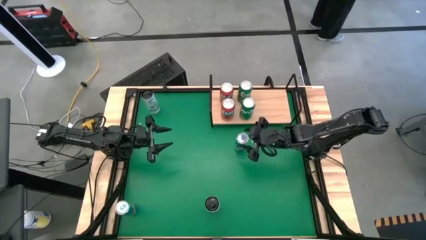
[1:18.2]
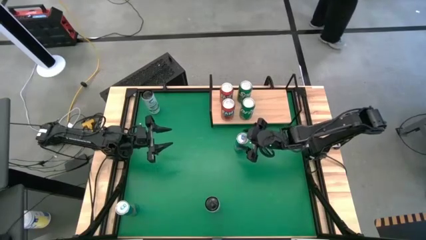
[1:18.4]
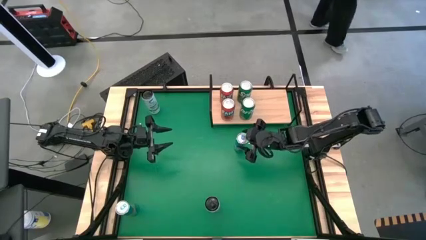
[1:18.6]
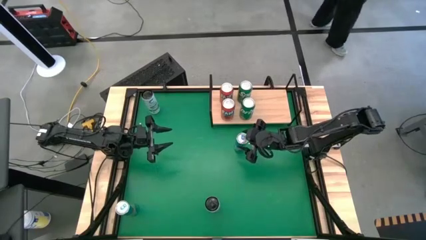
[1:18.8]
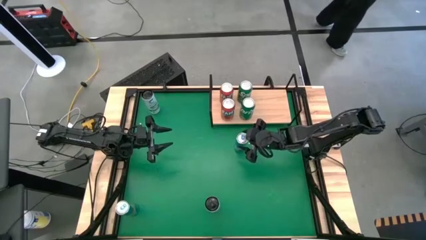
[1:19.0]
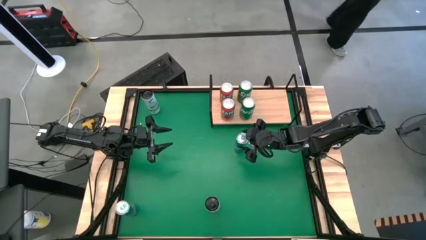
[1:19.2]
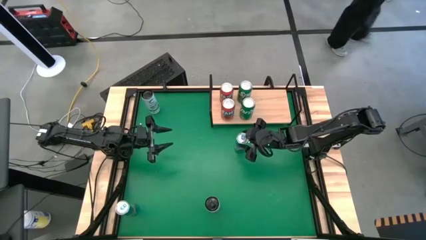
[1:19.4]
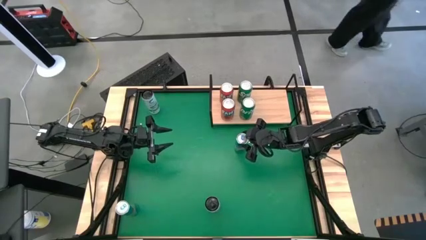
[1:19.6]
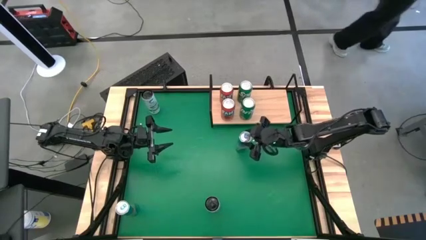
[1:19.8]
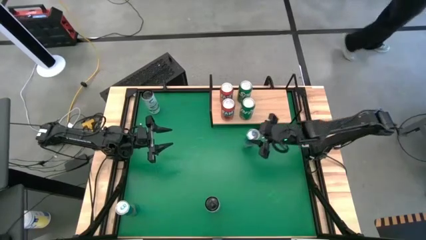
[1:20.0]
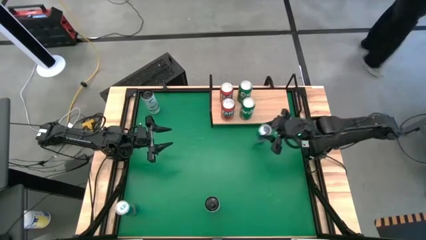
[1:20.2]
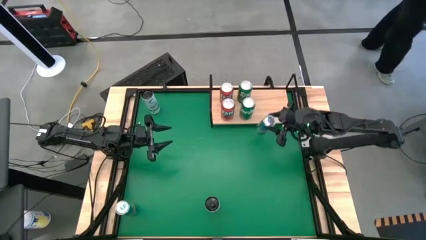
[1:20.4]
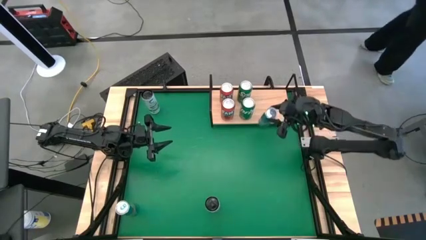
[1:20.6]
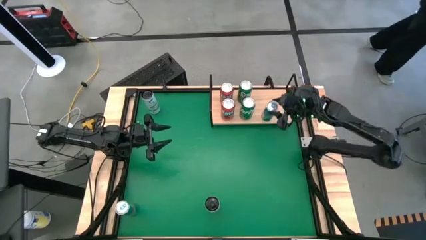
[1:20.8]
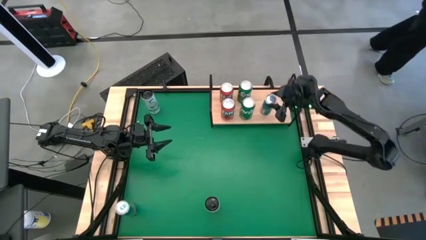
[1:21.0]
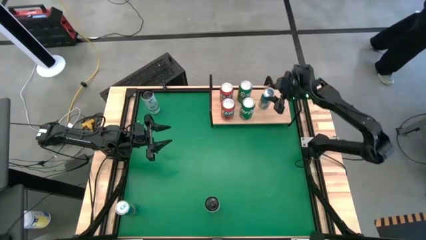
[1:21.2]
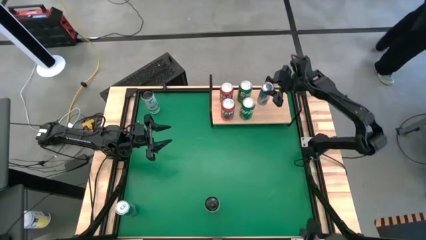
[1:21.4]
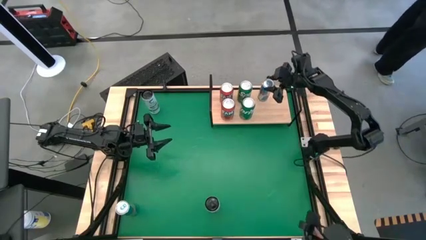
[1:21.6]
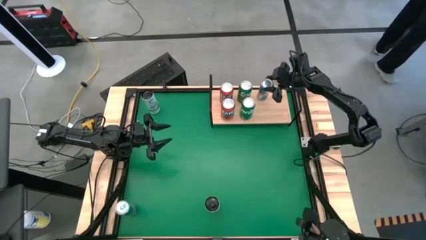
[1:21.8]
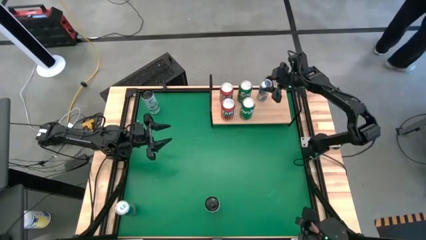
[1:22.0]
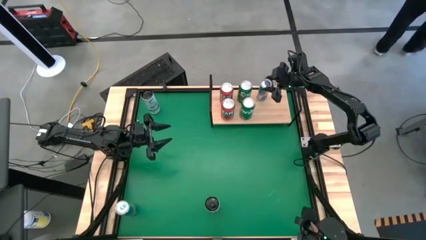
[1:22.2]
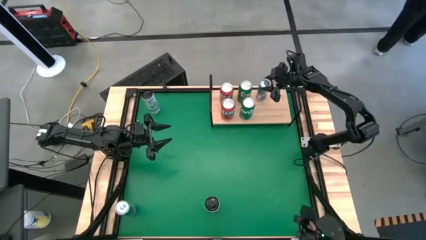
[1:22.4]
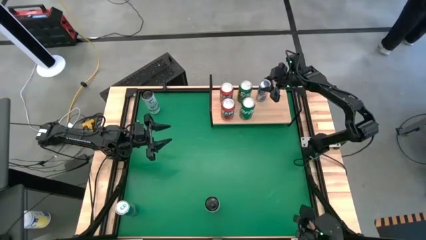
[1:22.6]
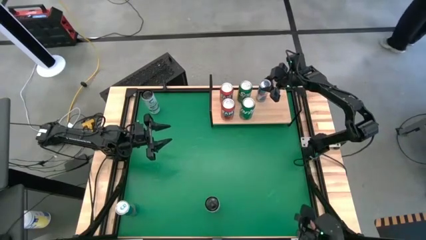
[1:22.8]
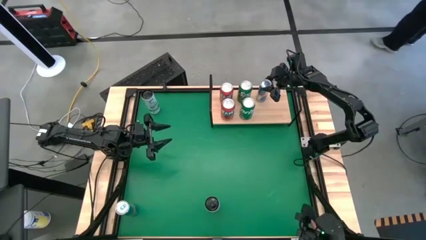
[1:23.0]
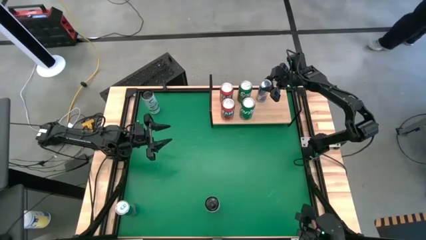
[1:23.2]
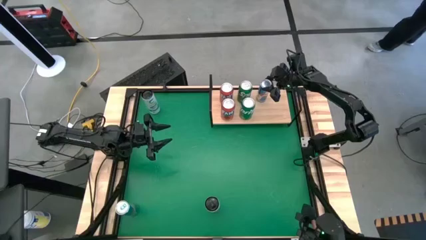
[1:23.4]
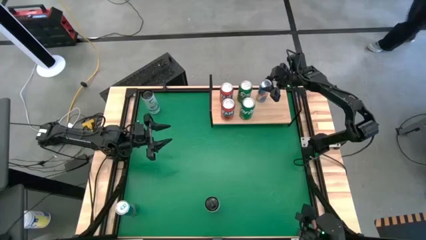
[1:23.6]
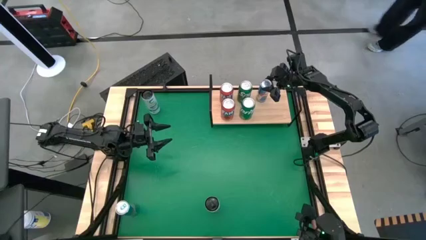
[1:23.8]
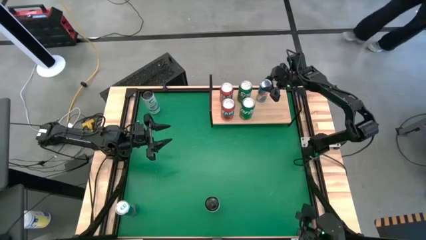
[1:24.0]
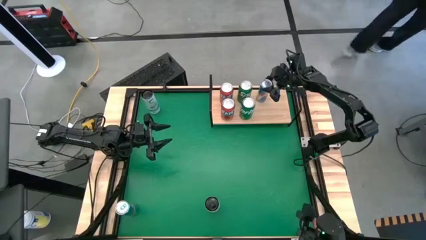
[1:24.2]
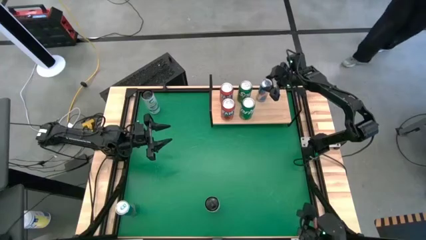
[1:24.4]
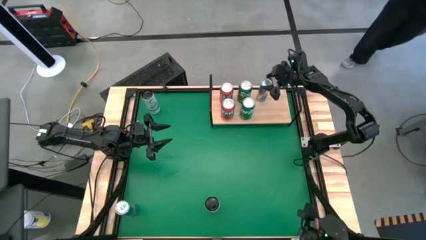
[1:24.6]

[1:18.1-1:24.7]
Task: Place canned beverage on shelf
Put the top blue soda can on the shelf

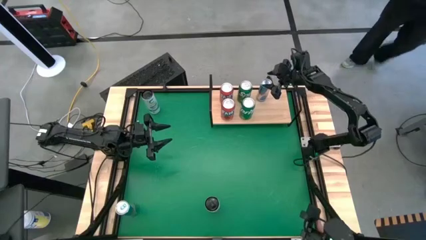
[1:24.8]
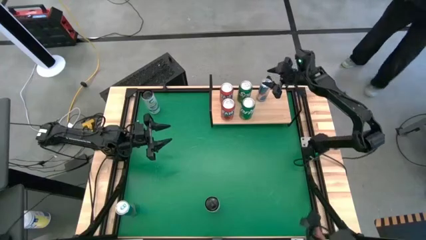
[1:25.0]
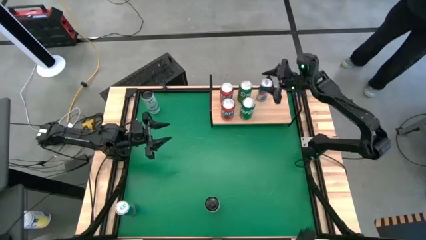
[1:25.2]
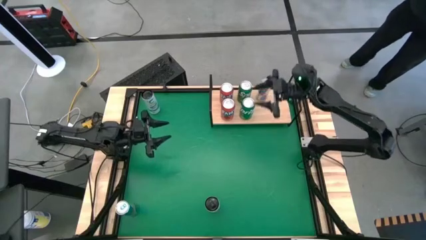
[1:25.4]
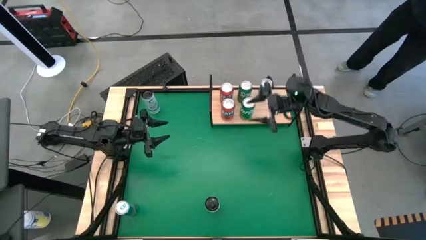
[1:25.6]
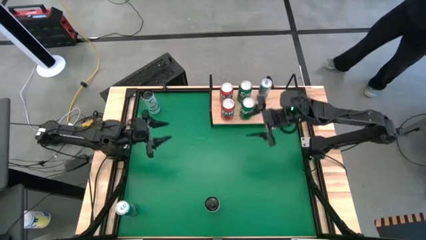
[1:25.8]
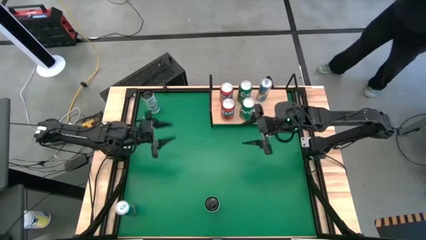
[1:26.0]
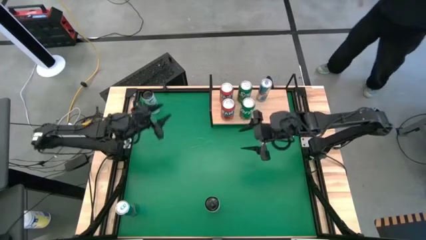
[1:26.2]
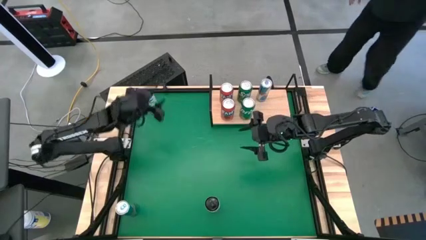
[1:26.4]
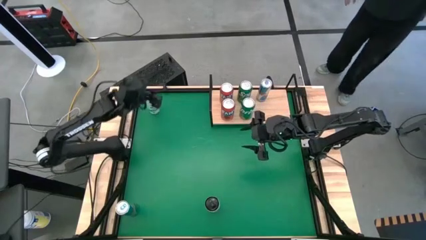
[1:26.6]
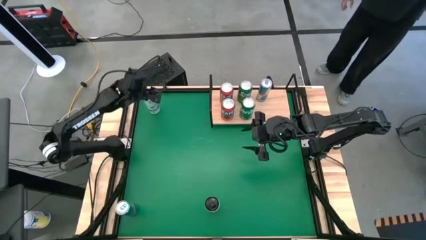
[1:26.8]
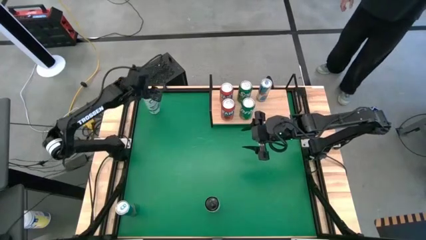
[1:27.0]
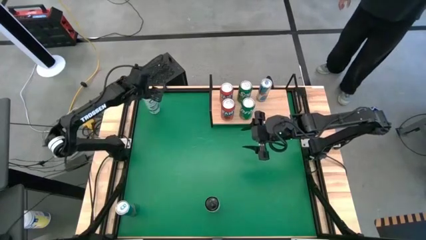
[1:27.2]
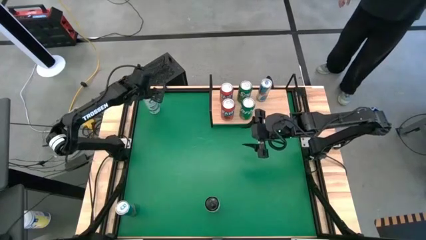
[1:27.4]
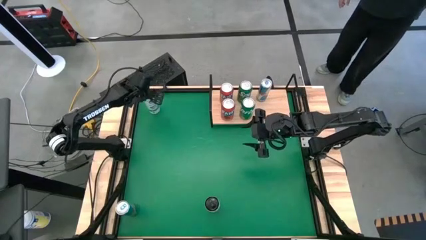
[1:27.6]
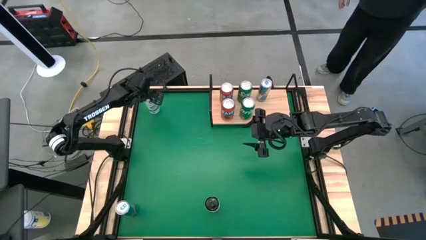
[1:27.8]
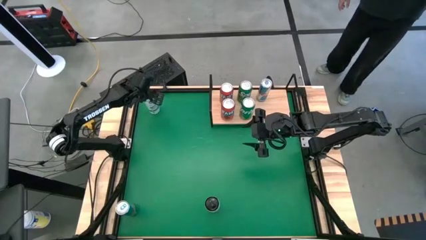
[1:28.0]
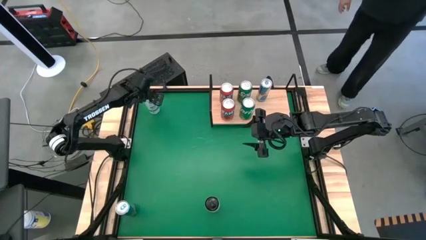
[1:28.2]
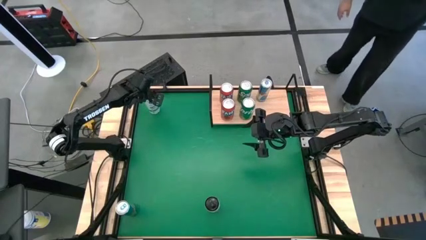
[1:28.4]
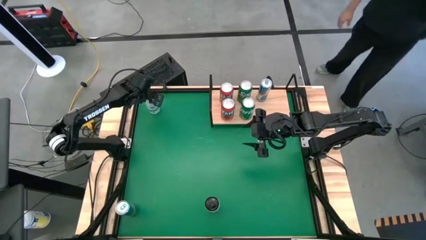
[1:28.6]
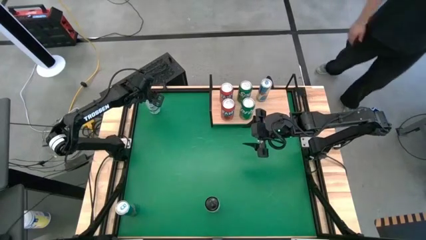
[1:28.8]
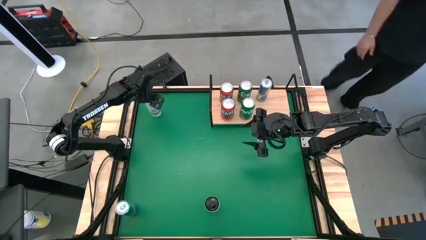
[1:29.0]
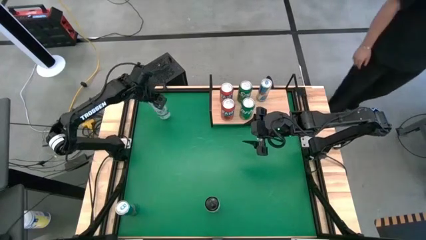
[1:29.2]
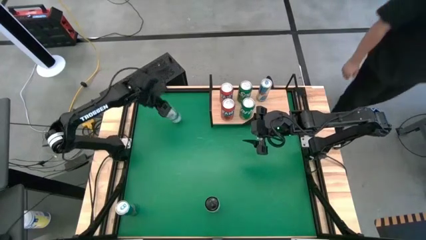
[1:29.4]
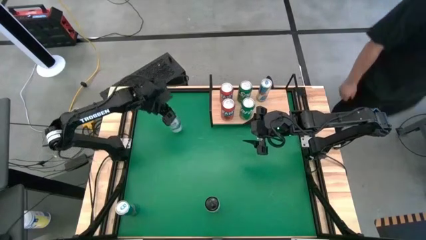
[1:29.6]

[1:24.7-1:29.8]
Put the top white-blue soda can on the shelf
